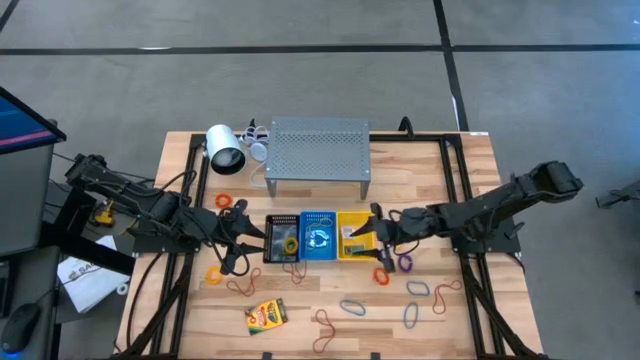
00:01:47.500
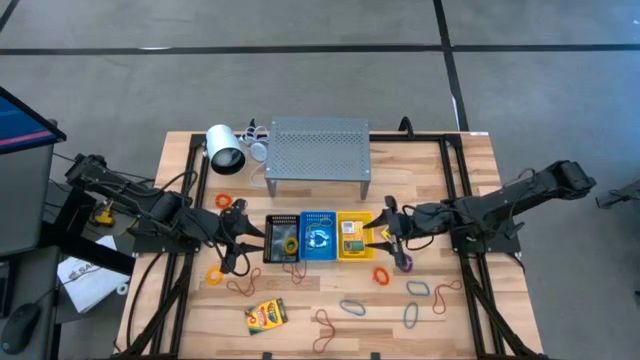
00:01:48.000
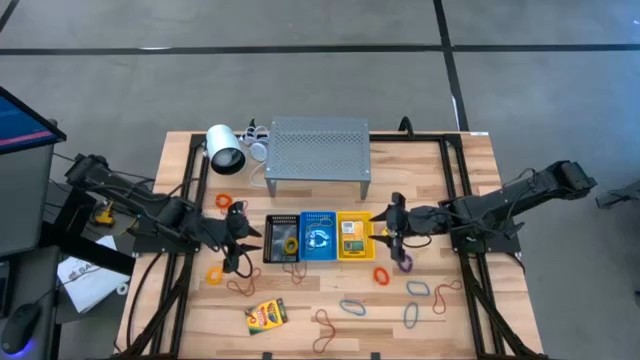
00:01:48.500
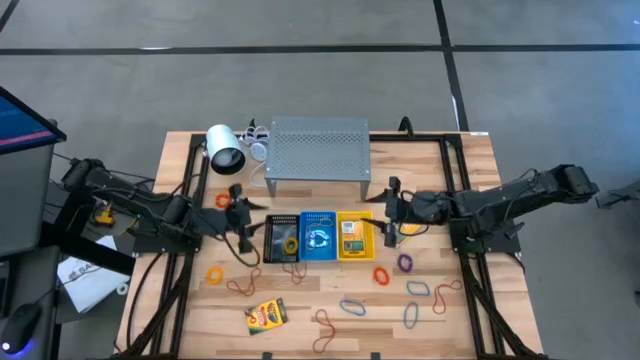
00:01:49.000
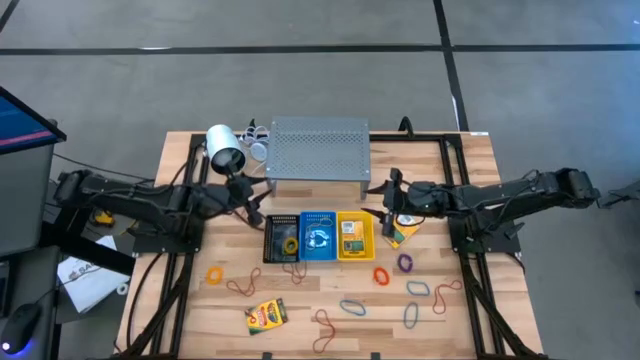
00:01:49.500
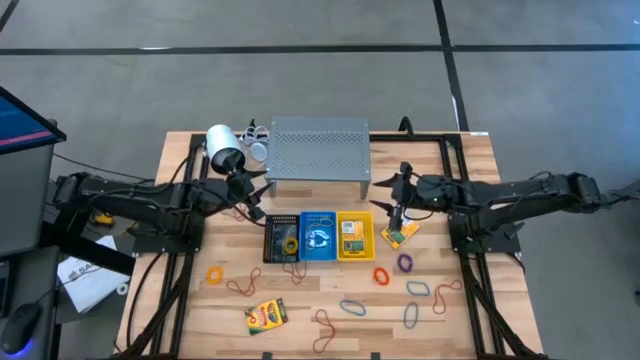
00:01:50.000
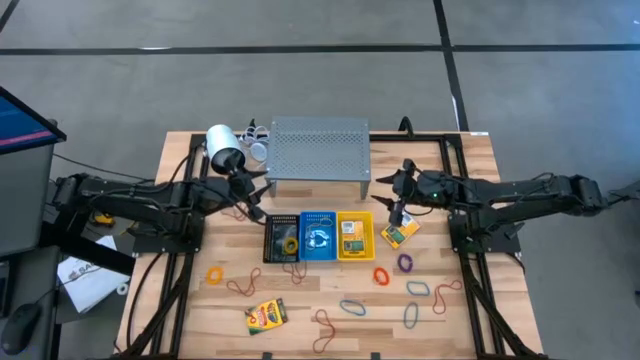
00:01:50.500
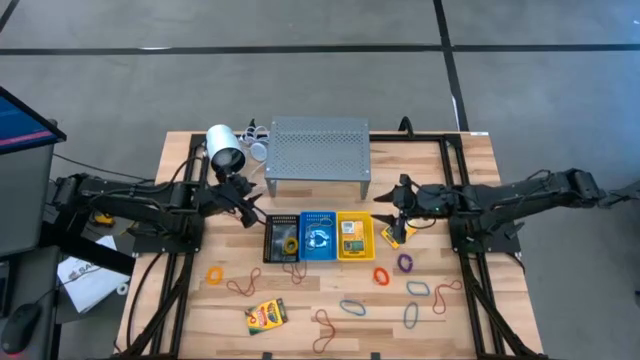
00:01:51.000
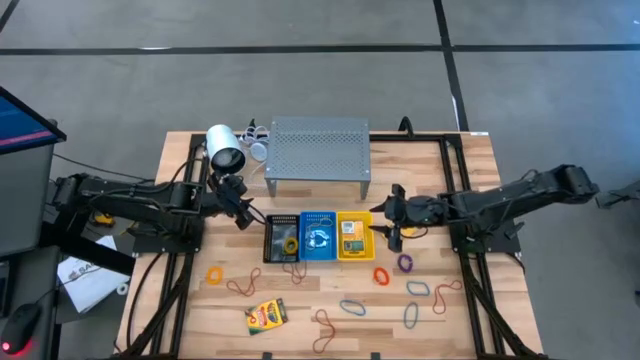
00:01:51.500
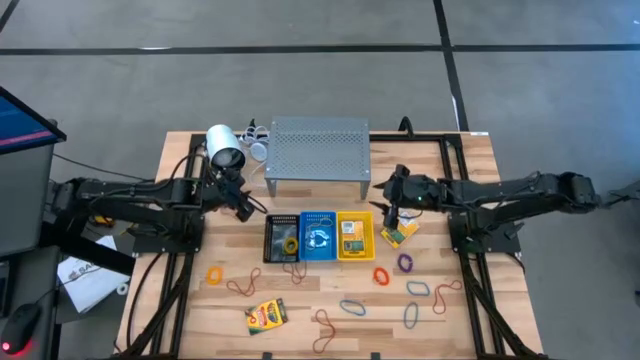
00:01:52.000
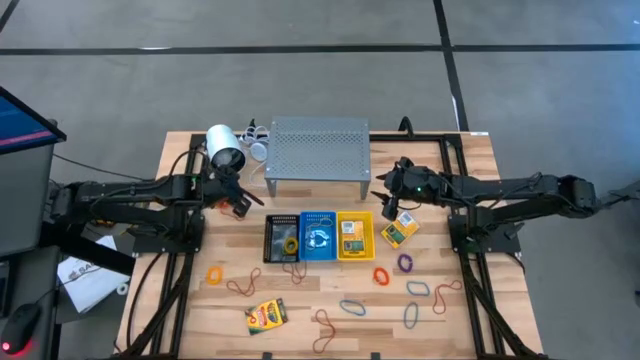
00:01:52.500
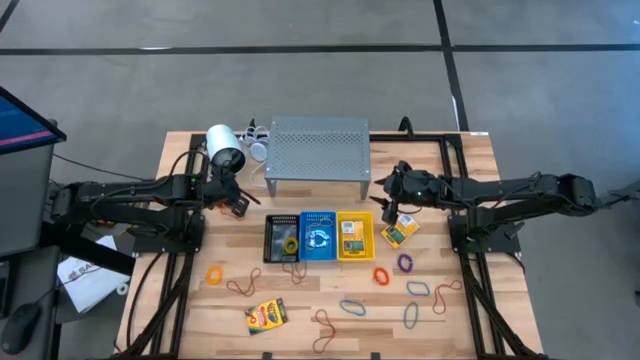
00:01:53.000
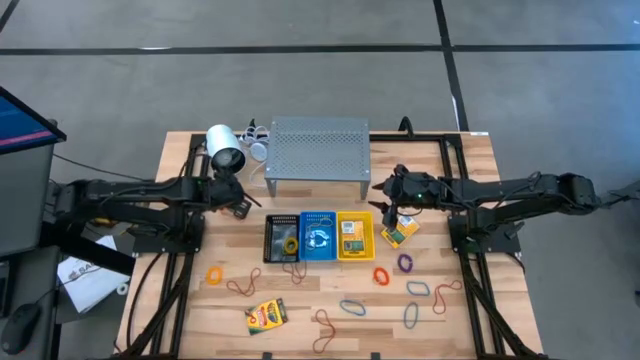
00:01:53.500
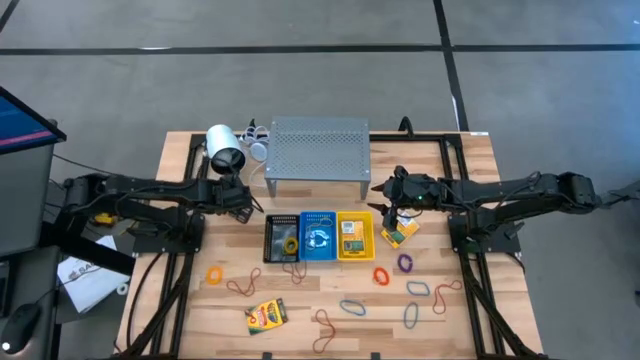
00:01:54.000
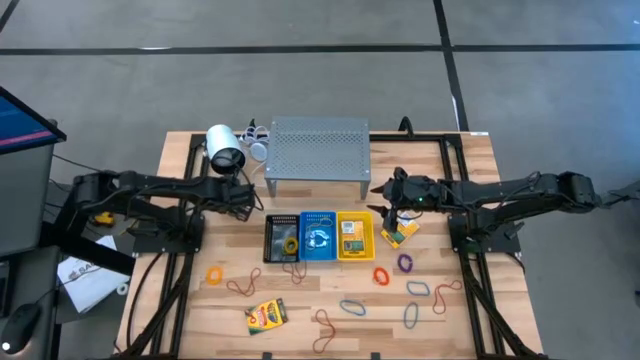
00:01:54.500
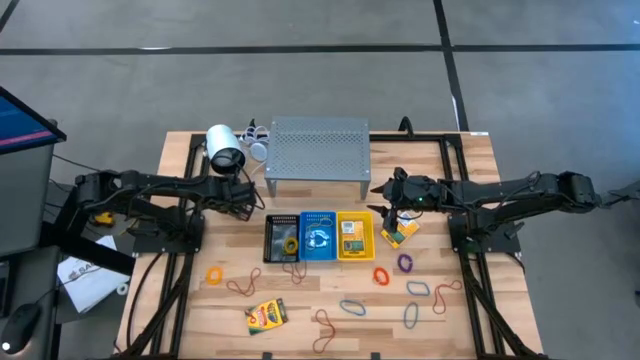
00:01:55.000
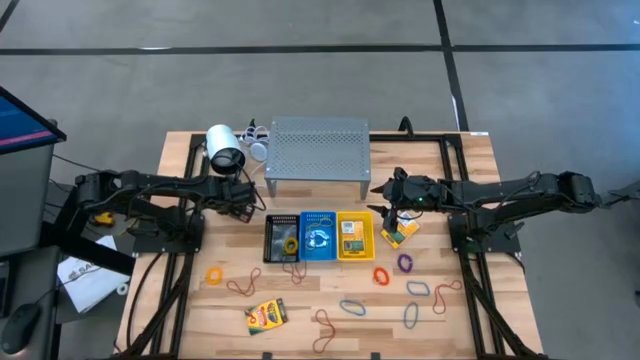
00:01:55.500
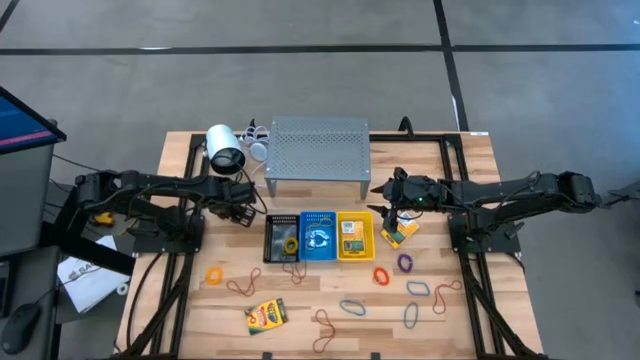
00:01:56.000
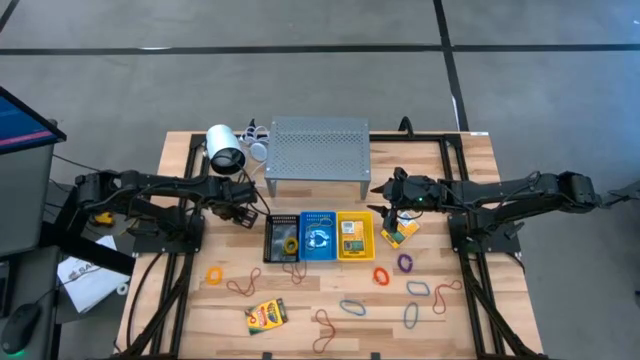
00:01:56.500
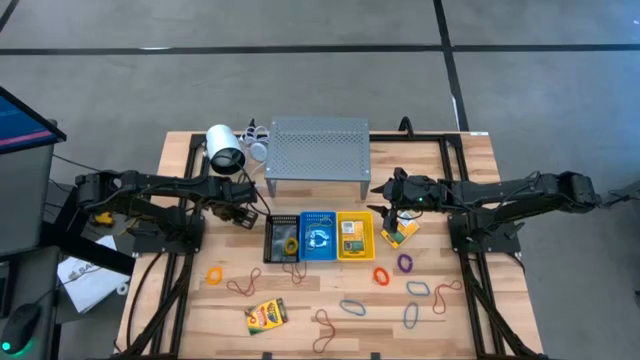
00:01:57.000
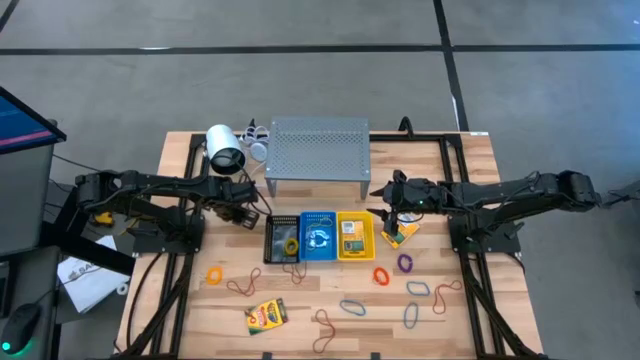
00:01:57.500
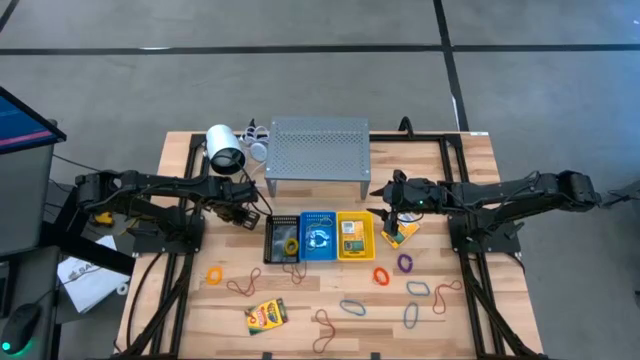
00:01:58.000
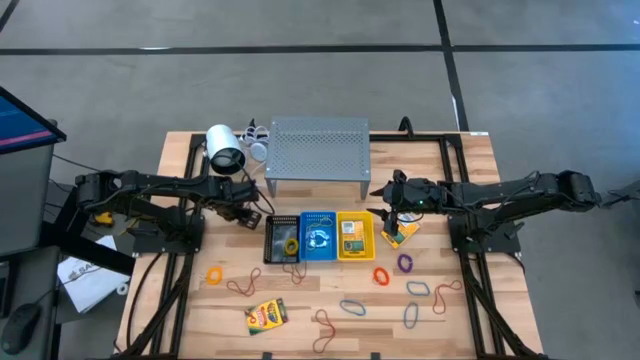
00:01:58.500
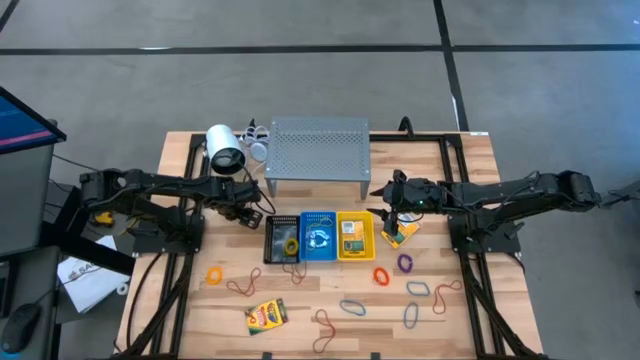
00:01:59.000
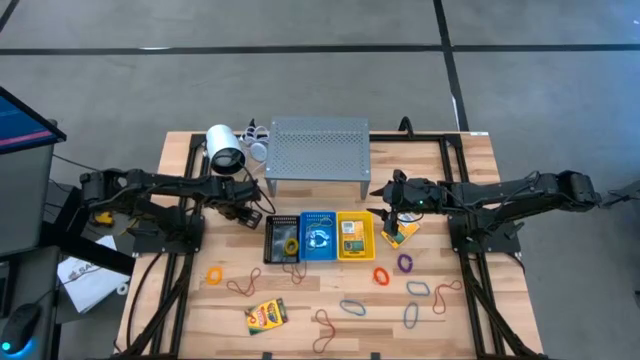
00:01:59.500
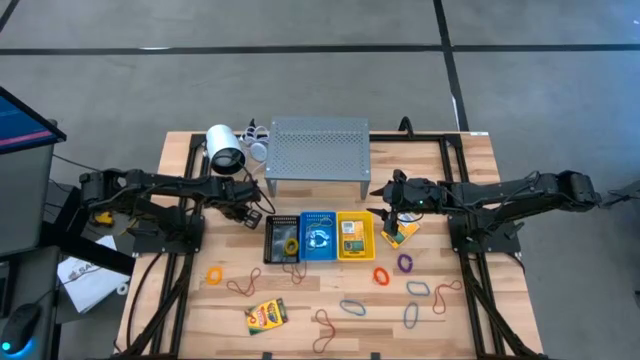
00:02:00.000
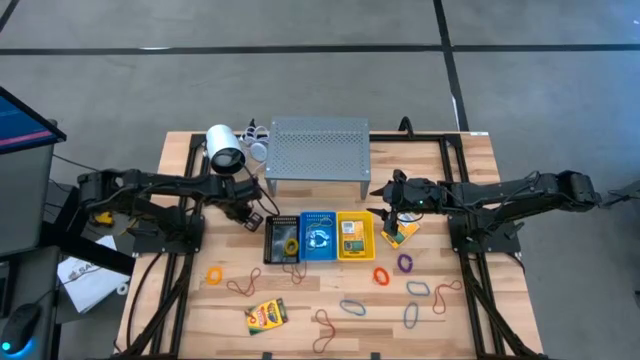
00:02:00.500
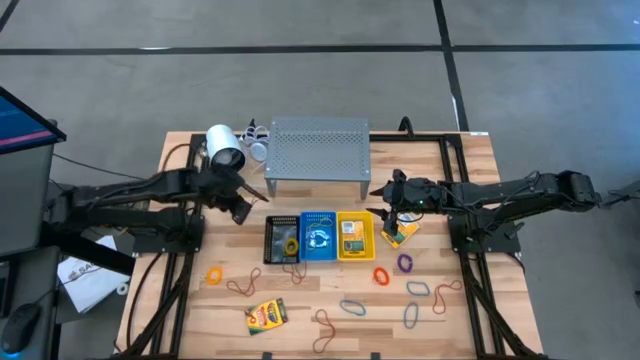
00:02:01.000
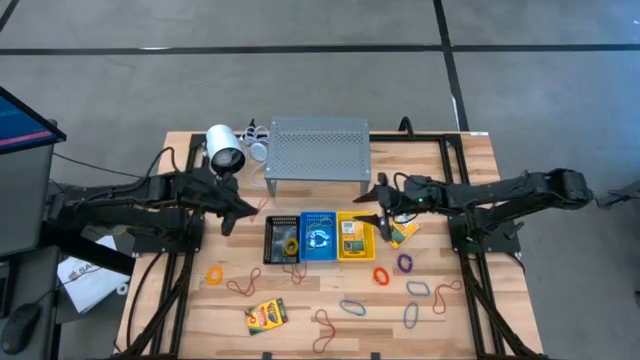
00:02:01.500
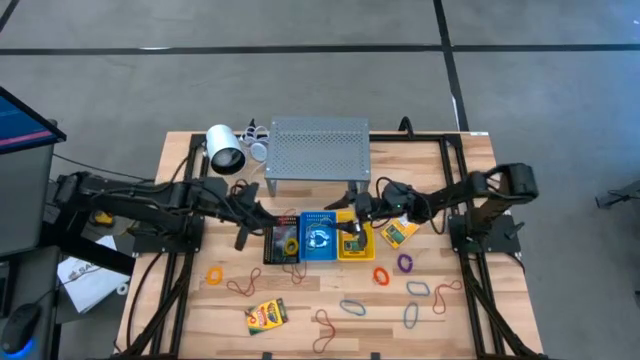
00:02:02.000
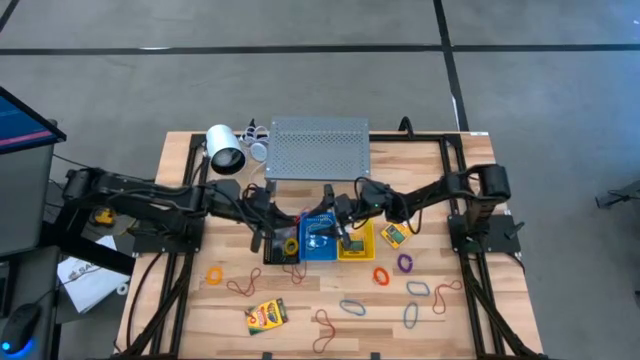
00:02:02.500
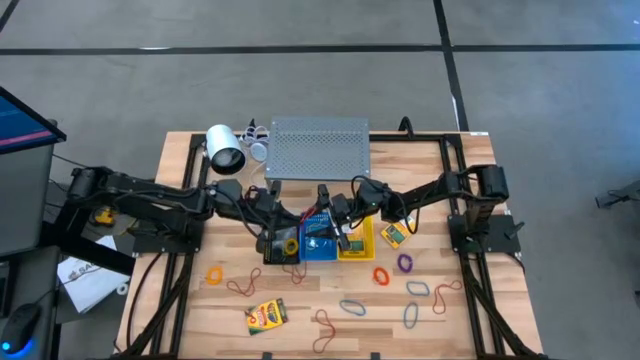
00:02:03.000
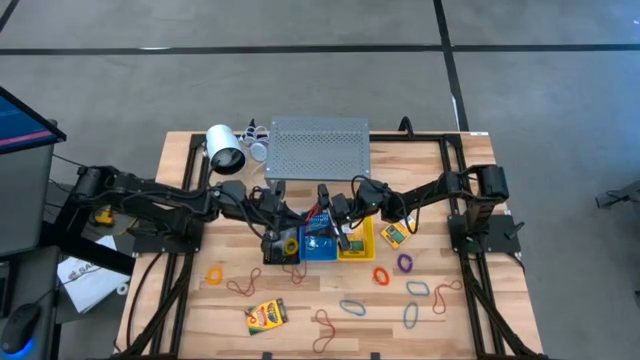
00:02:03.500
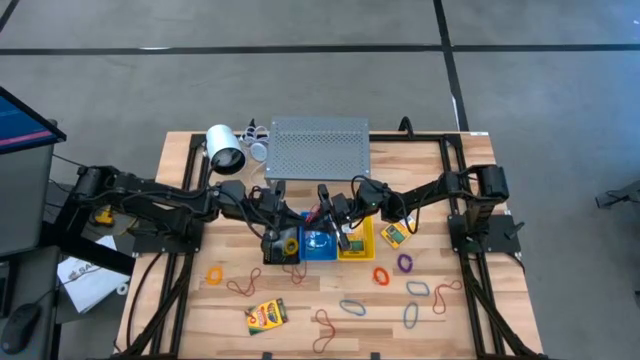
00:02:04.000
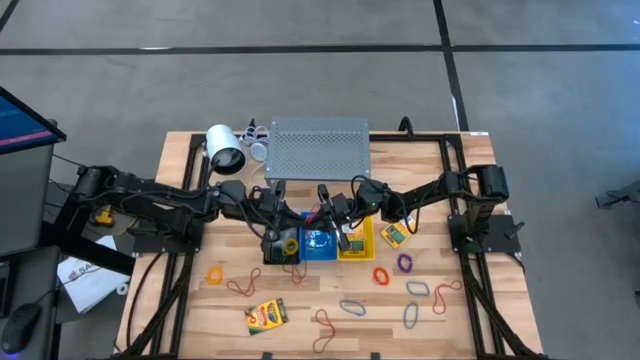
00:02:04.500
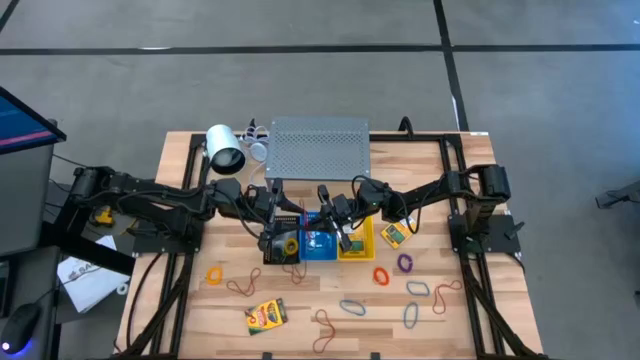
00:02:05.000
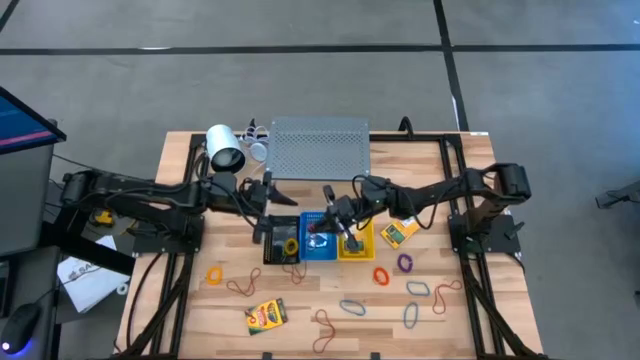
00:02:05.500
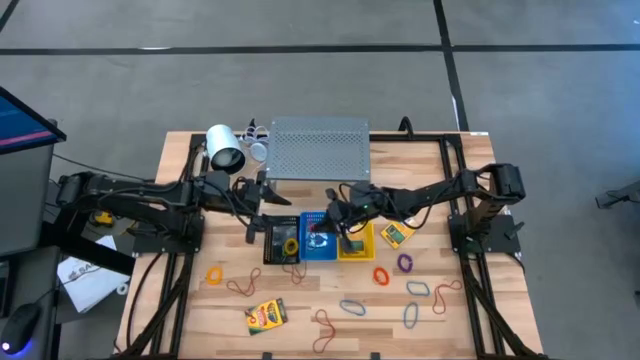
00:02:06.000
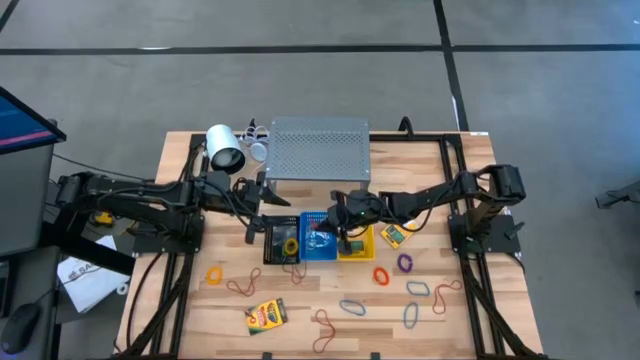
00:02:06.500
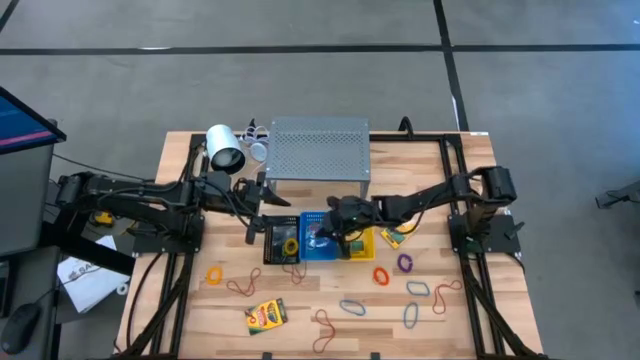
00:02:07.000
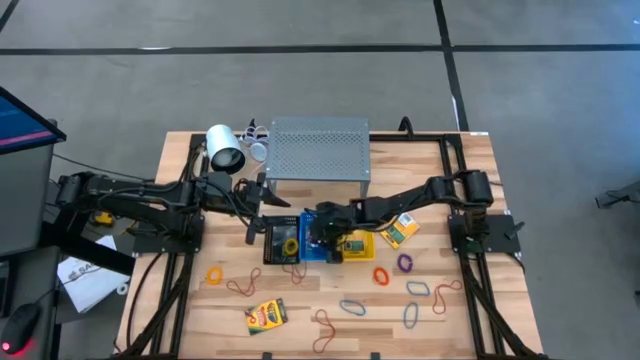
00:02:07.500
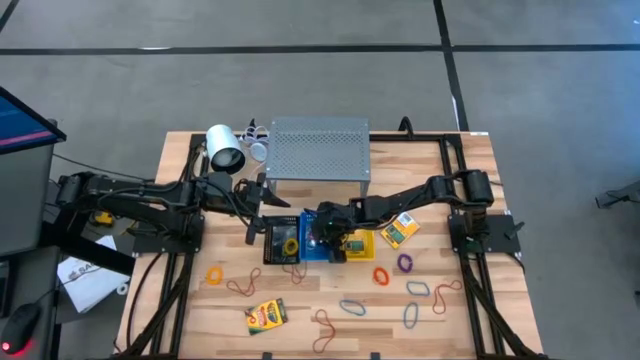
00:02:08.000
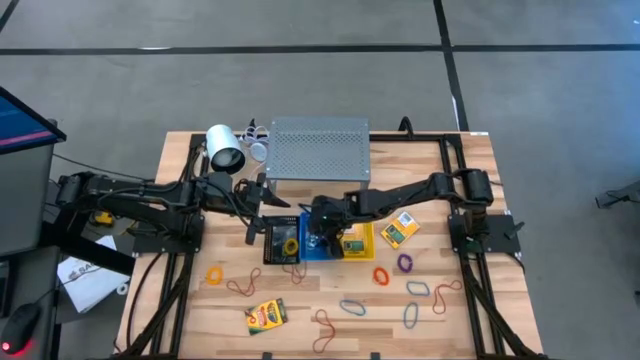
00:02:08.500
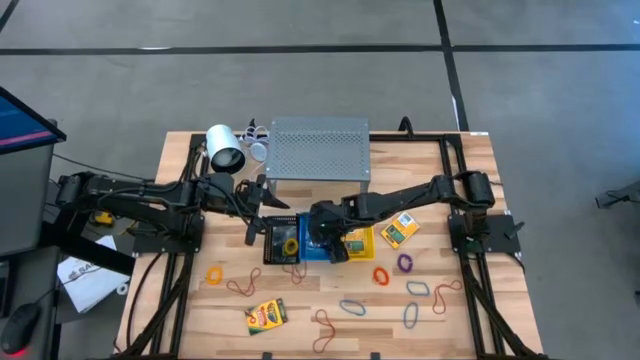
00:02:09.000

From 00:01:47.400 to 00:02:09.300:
Task: Pick & Place Office Desk Supplies
Put the red rubber band into the blue basket
